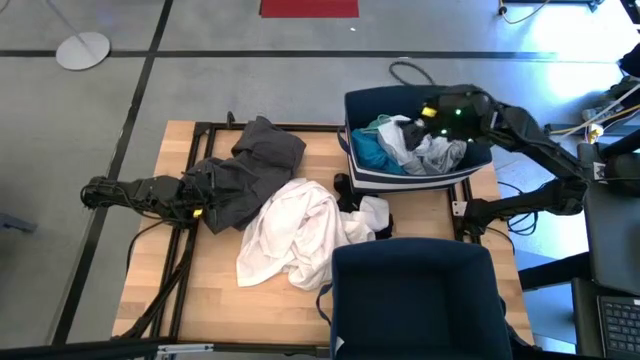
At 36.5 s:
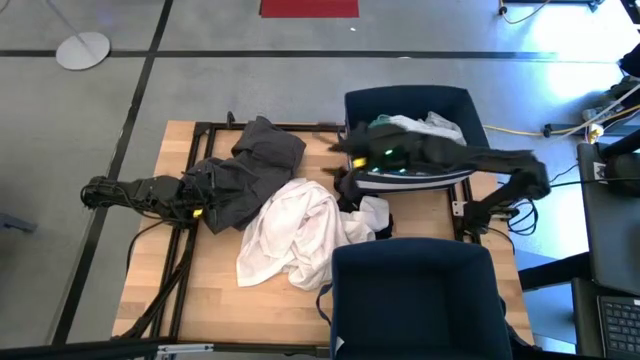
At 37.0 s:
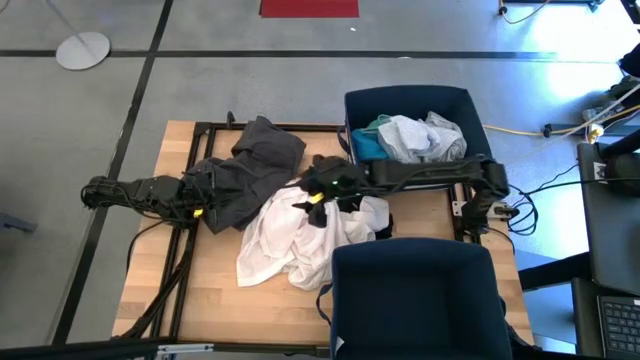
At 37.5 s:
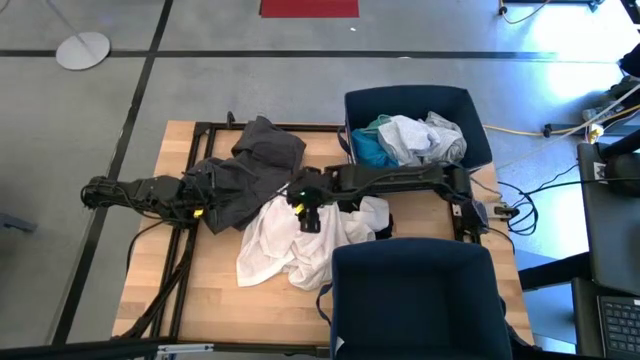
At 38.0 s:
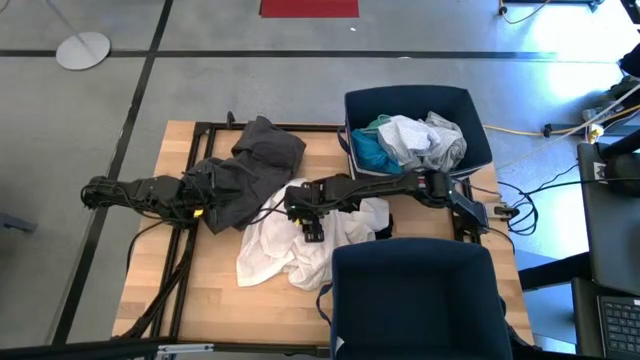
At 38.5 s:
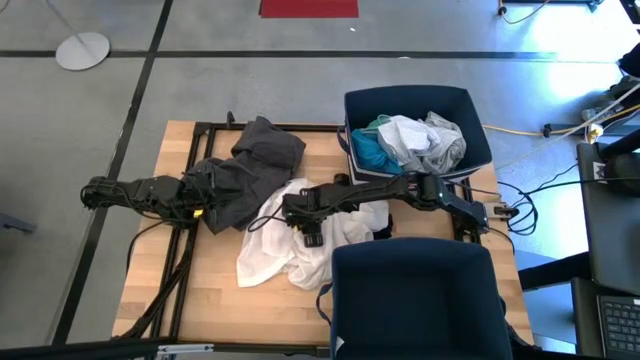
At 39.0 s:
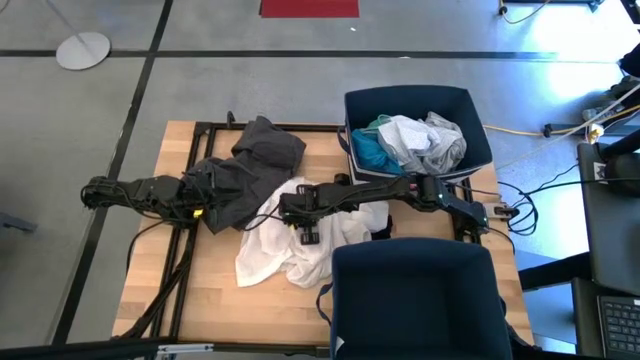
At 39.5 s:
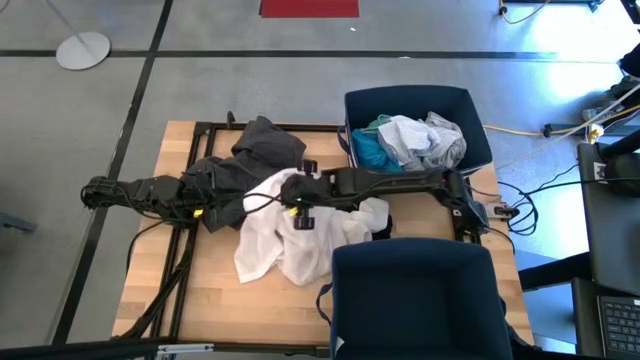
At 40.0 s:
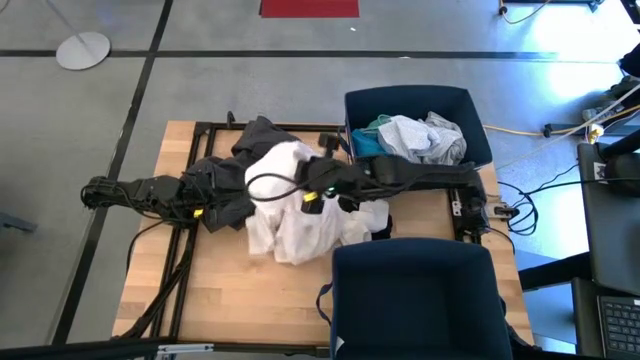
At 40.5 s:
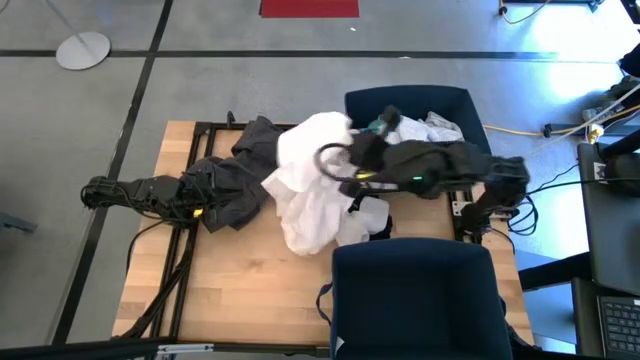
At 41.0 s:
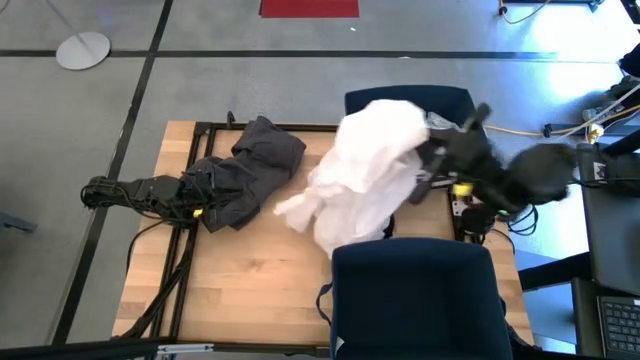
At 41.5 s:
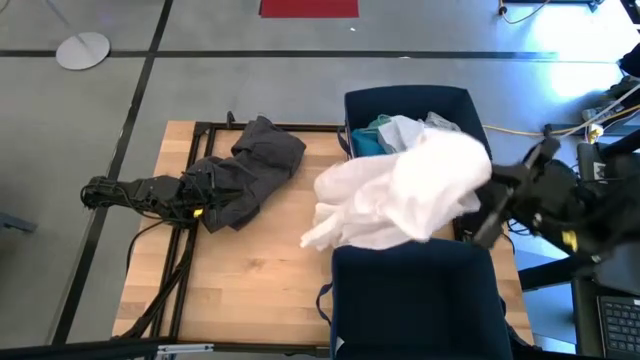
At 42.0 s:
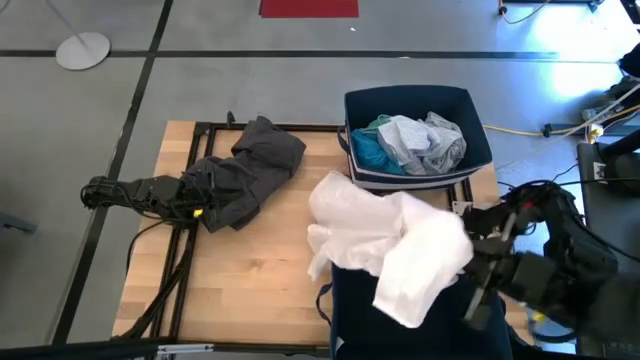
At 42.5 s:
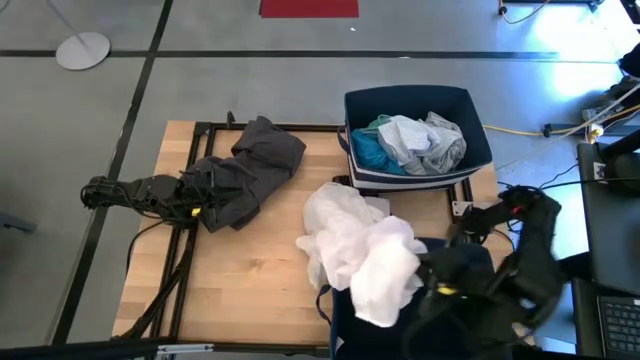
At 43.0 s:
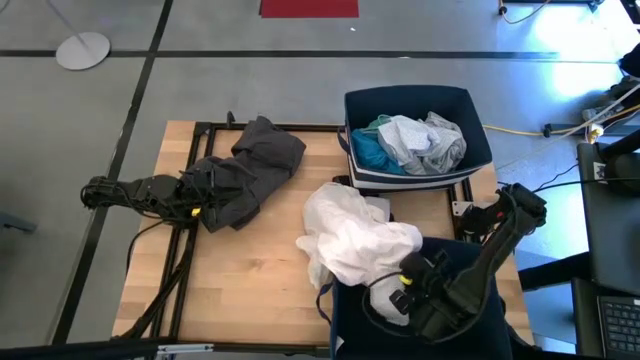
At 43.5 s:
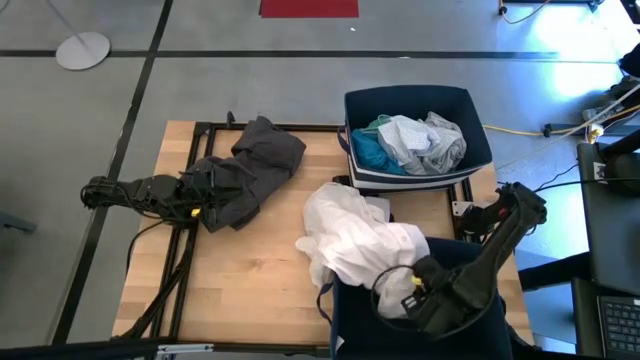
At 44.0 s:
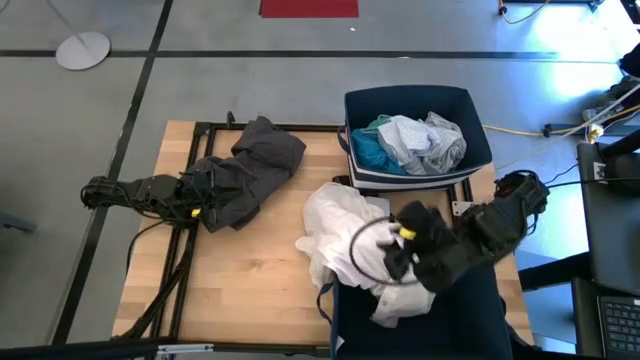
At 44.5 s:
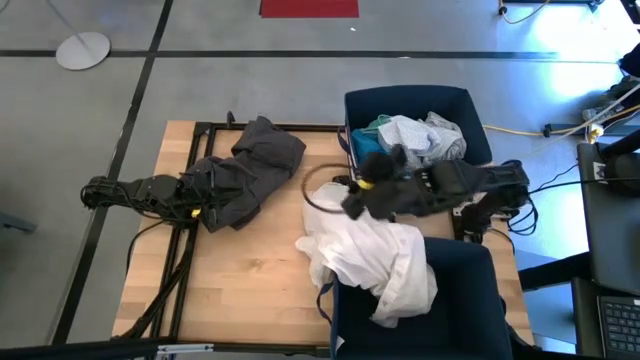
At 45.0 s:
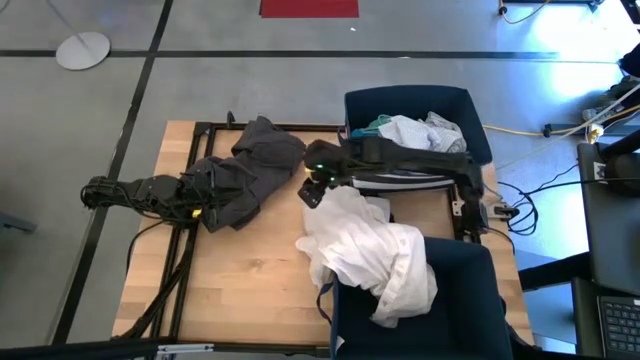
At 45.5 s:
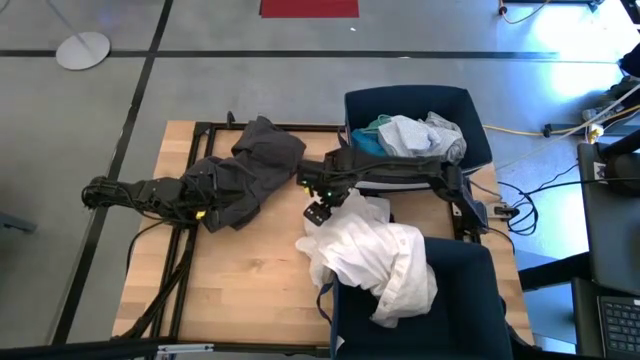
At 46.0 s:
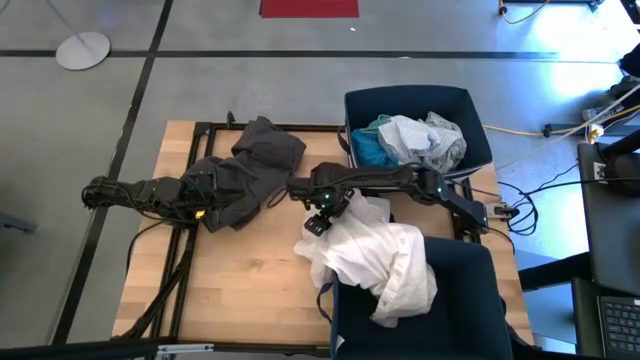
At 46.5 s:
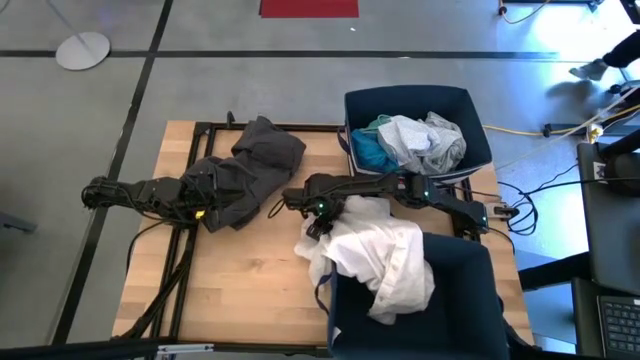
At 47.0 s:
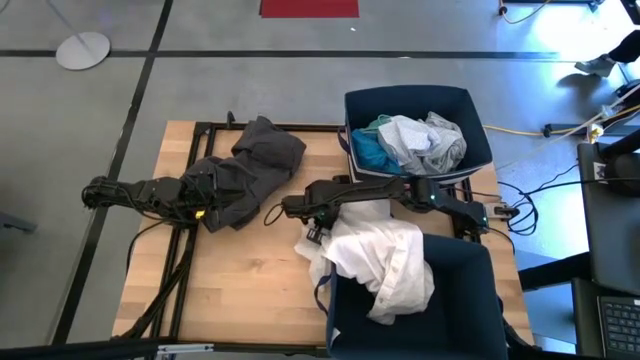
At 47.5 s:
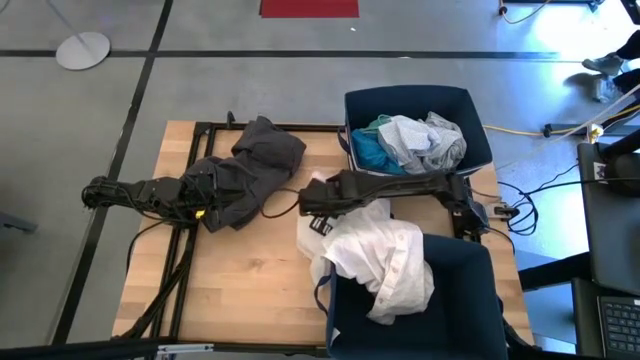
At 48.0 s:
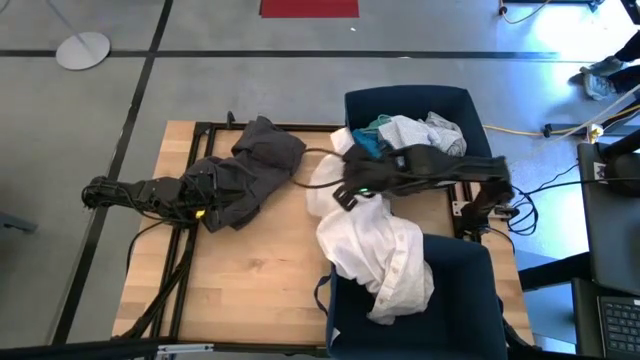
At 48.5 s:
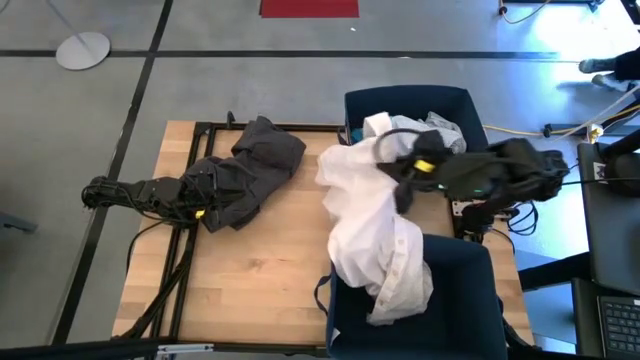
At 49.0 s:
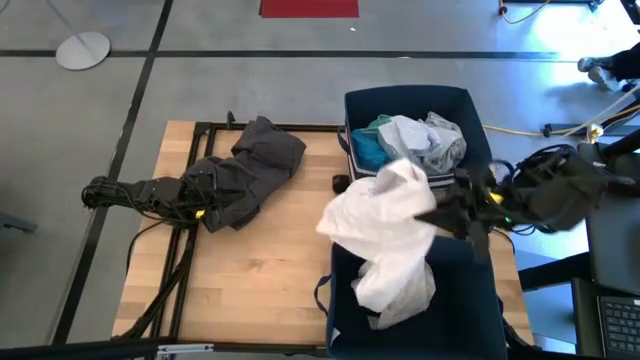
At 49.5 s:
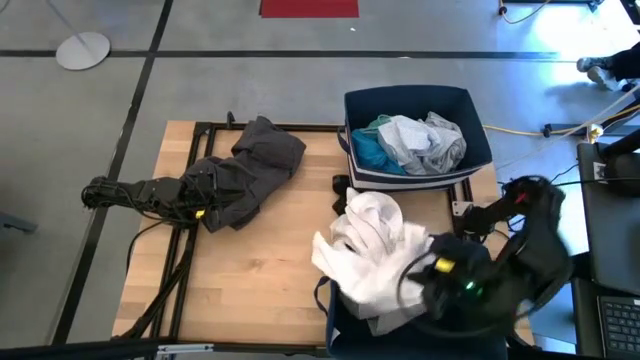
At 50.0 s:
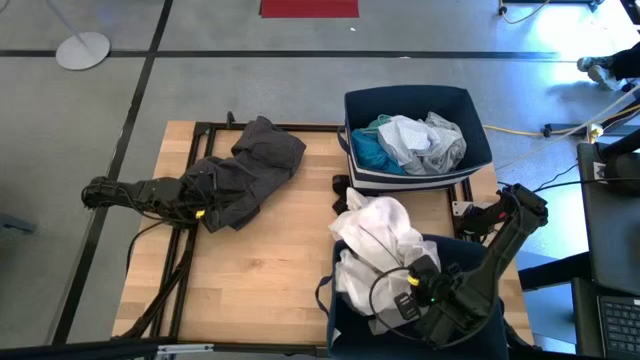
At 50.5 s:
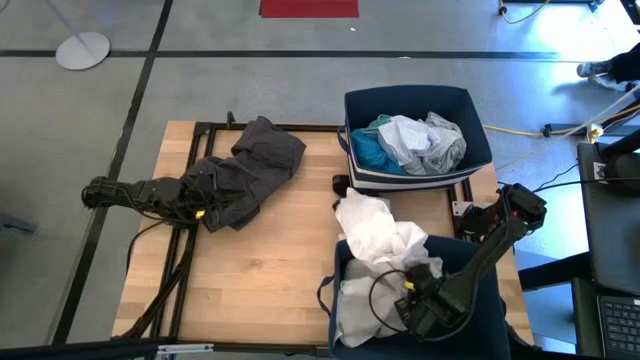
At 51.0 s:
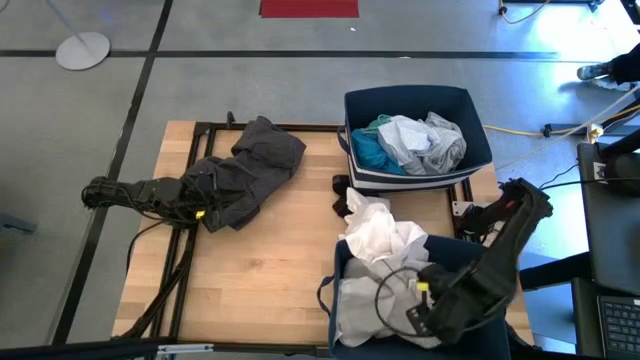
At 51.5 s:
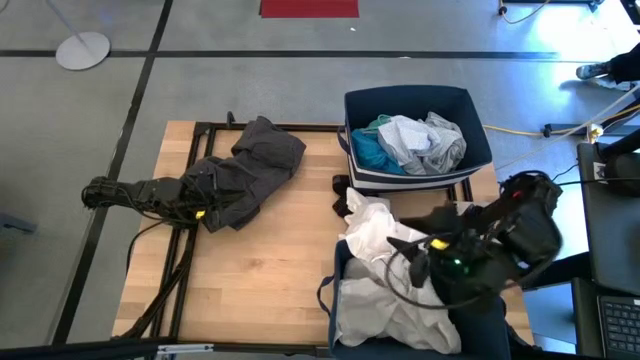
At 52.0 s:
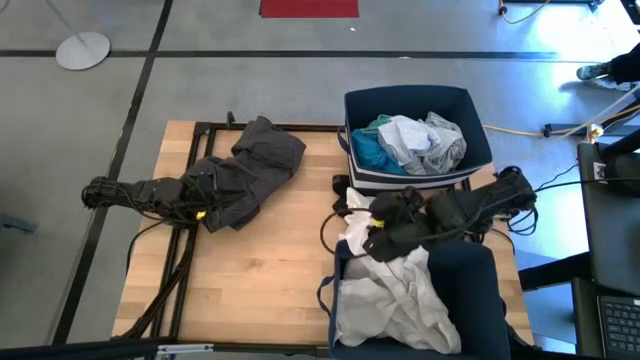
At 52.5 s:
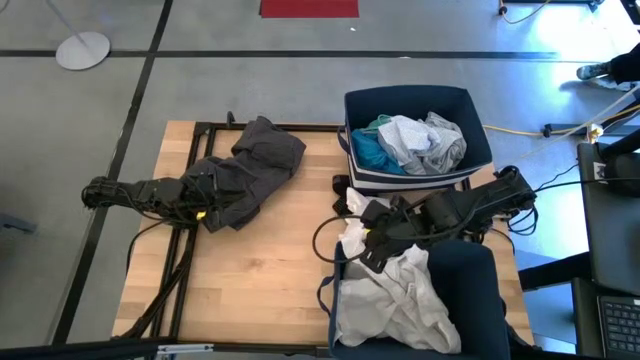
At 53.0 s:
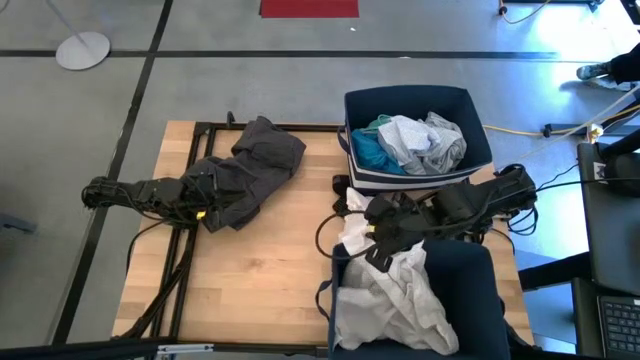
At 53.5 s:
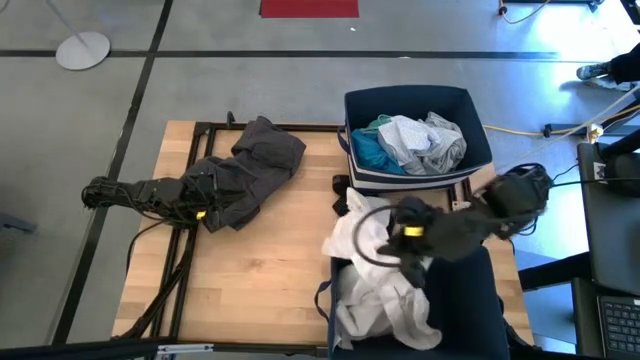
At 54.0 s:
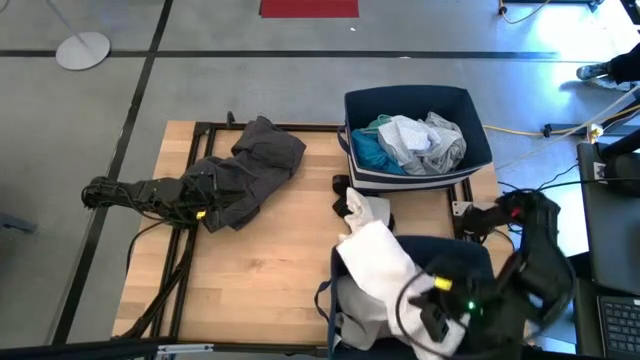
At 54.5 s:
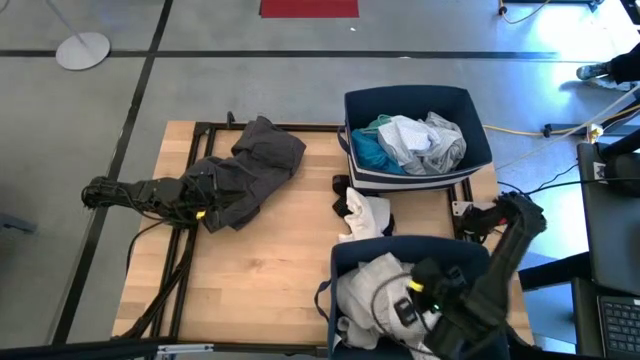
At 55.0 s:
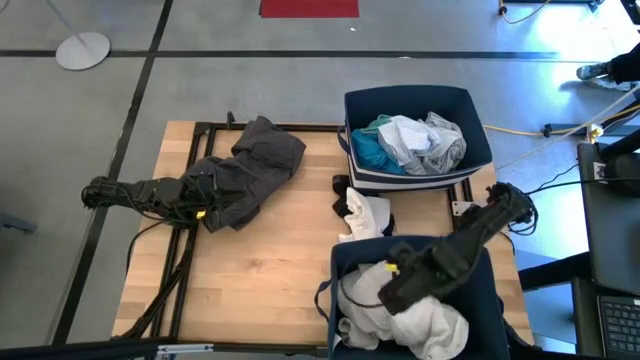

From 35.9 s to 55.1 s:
Task: Sort clothes
Put the white shirt into the bottom laundry bin

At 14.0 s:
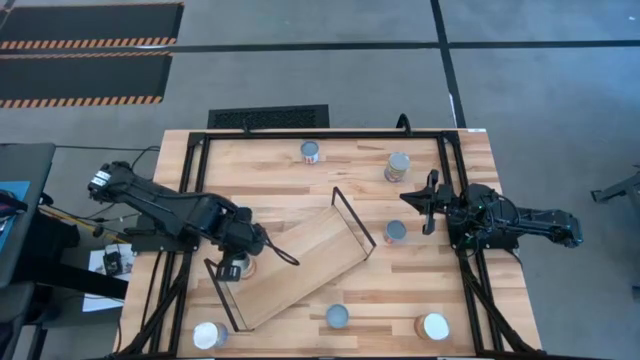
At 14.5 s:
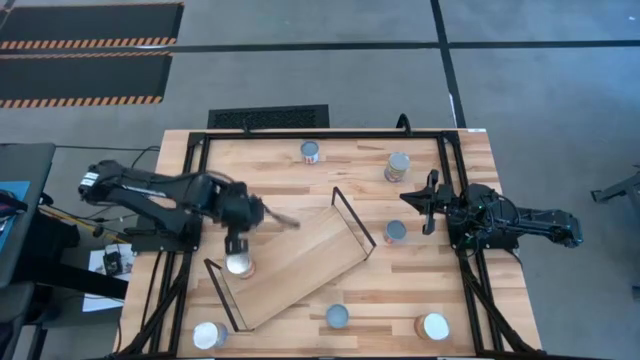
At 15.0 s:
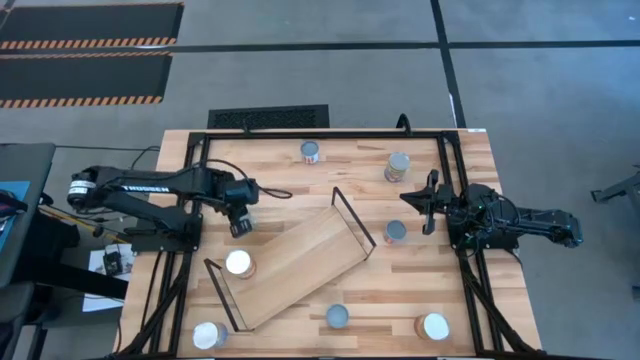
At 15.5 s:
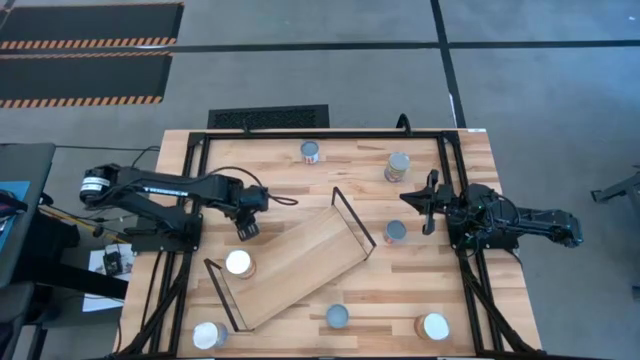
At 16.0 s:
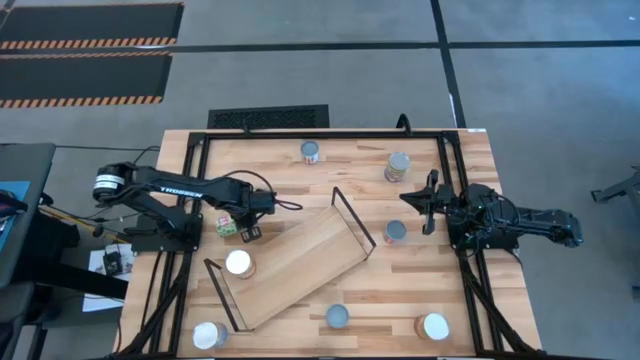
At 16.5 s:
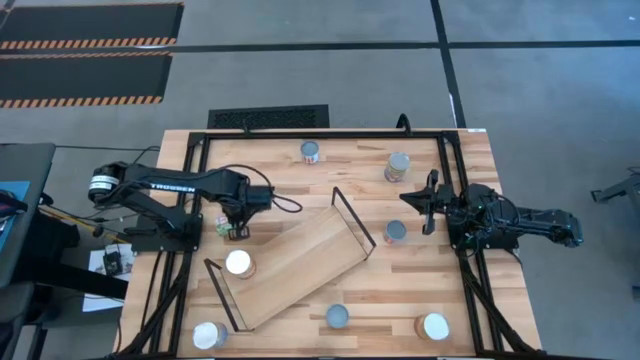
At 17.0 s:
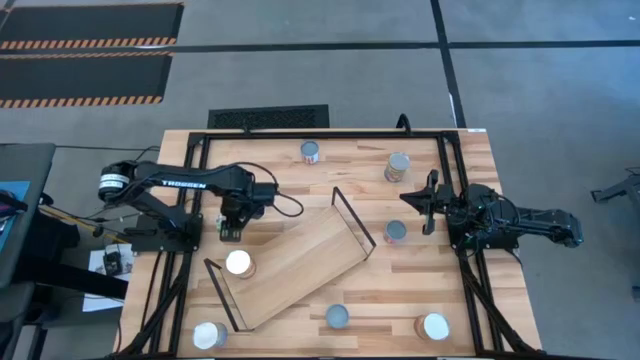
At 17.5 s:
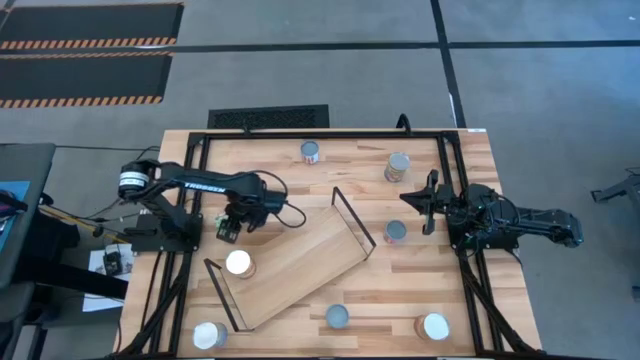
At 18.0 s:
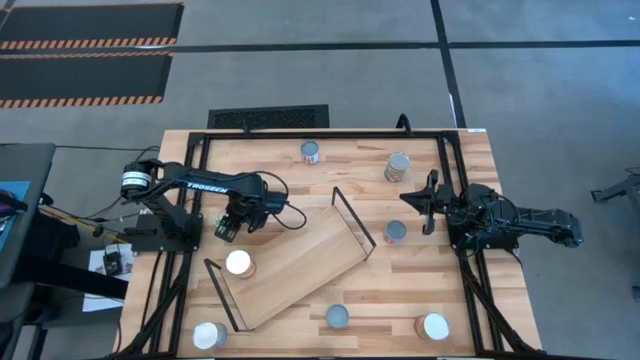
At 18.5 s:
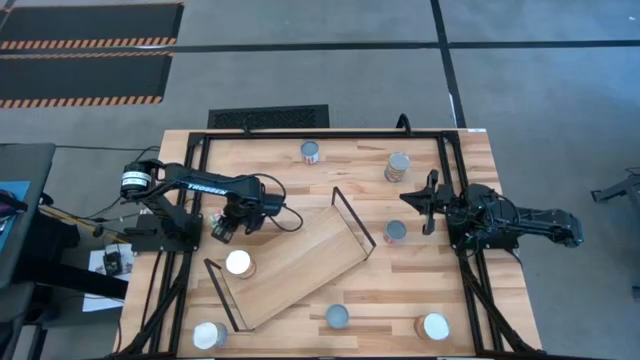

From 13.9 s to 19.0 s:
Task: Pick and place cans onto a shelf
Put the canned strawberry on the shelf
